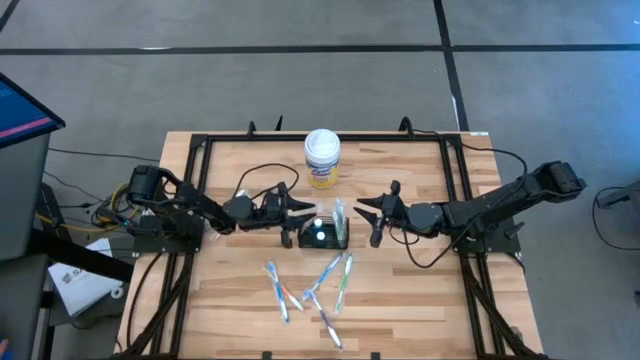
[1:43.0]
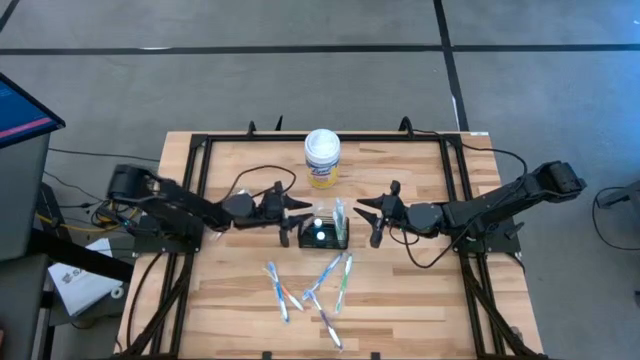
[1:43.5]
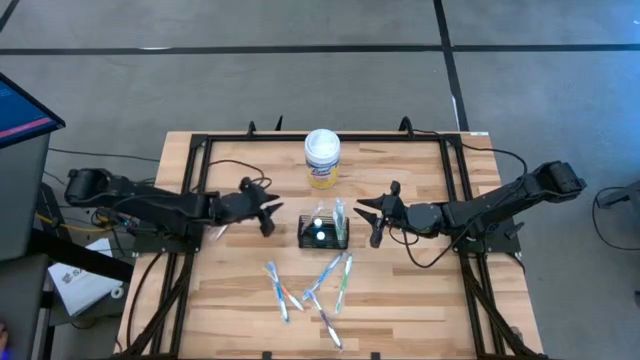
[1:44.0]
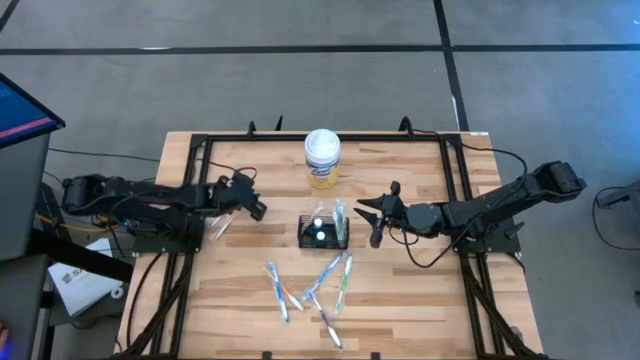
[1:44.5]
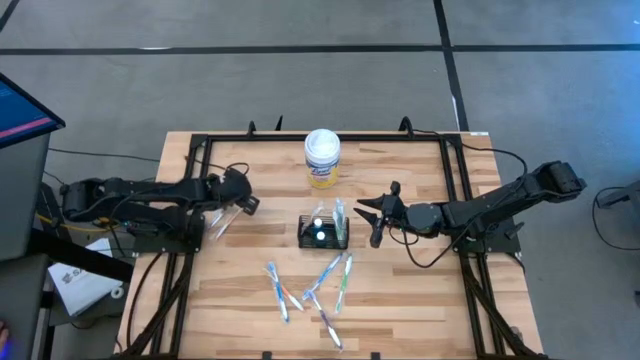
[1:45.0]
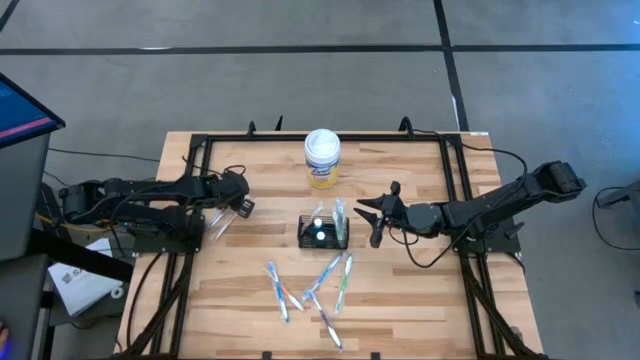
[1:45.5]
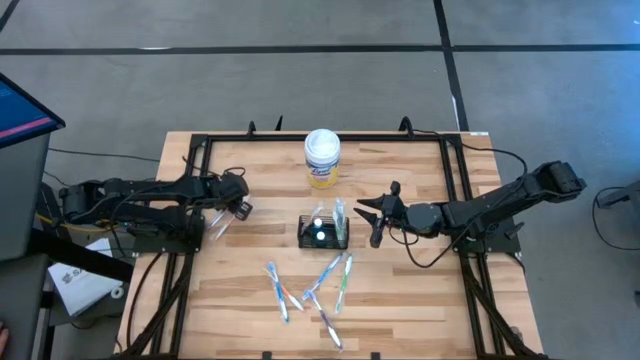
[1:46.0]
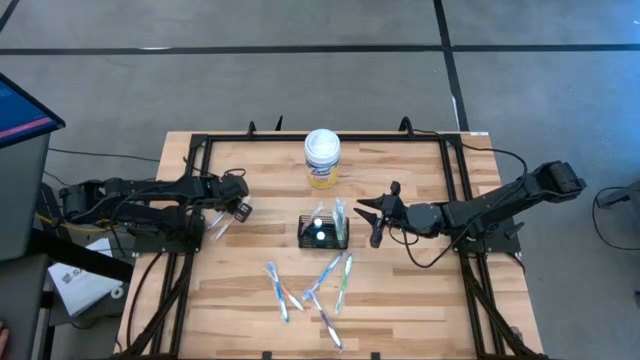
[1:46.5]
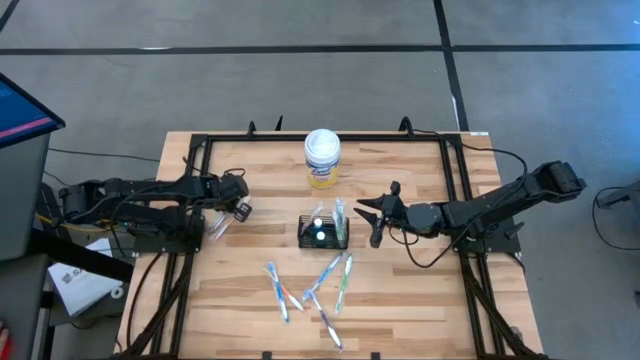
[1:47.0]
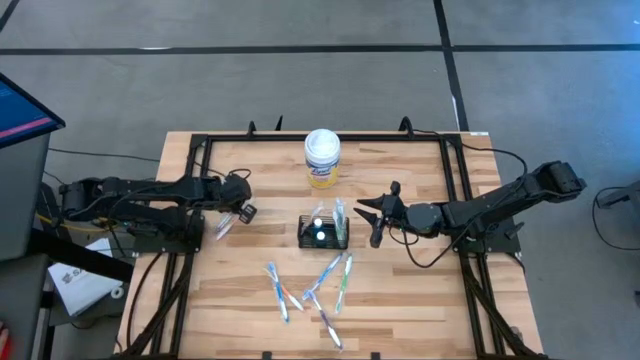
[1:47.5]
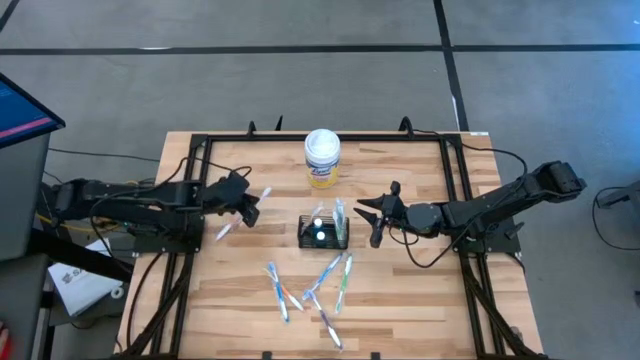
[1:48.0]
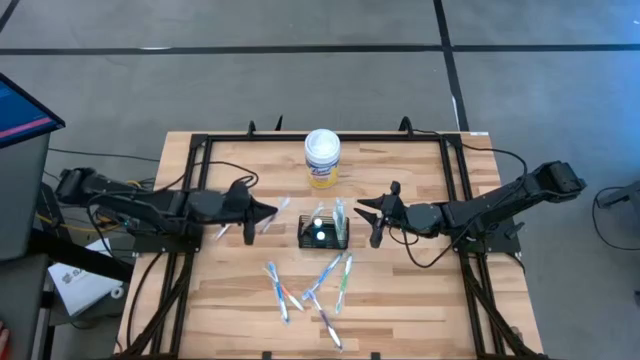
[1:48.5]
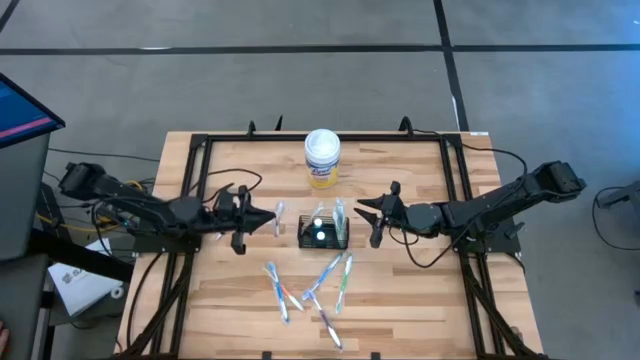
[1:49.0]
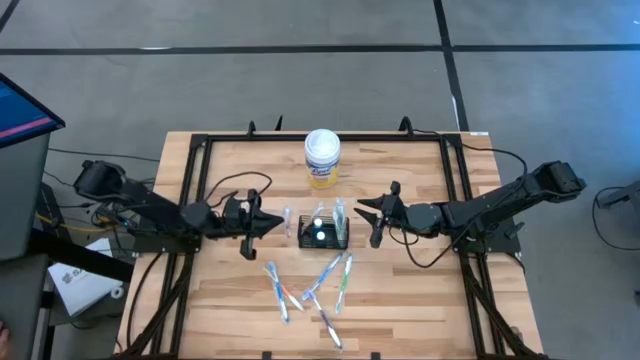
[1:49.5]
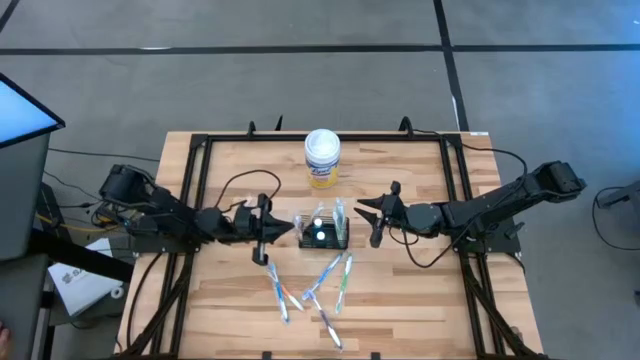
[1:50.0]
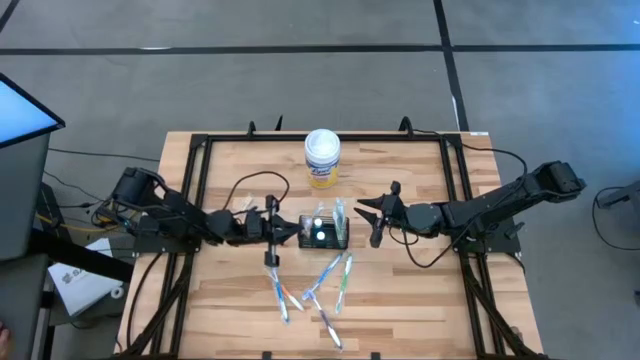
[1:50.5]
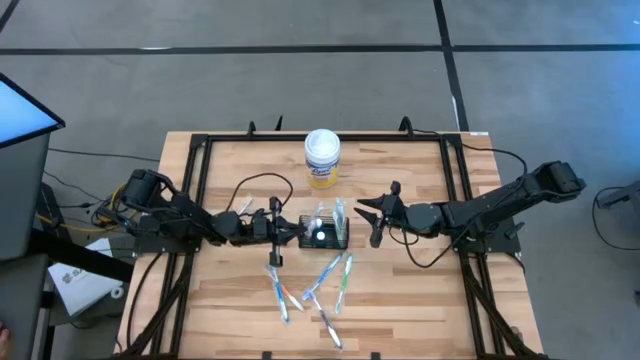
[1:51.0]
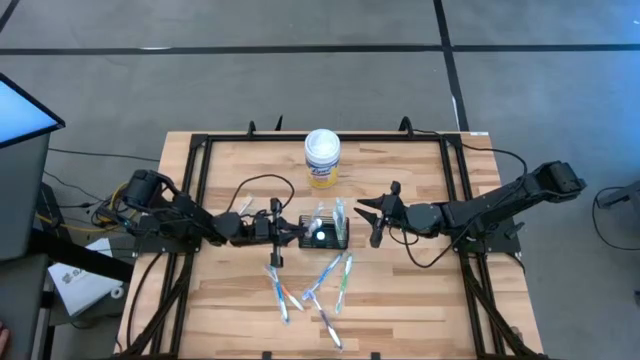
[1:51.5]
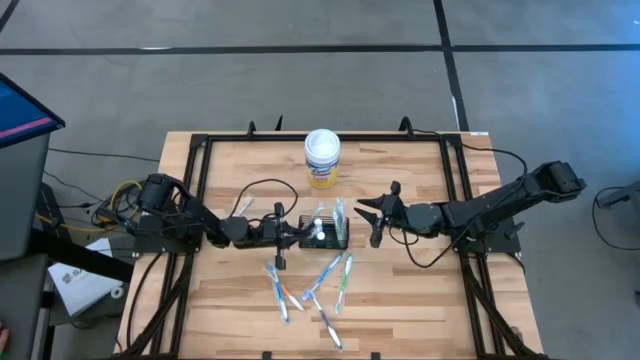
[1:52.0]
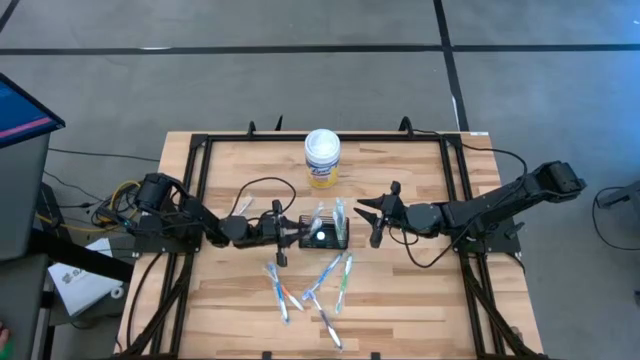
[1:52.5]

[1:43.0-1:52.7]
Task: Pick & Place toothbrushing station
Put the top violet toothbrush into the black mesh organizer

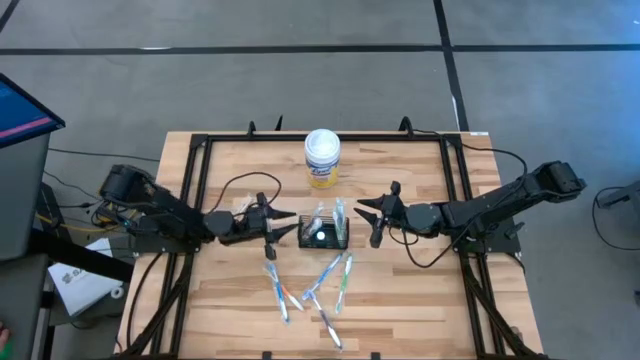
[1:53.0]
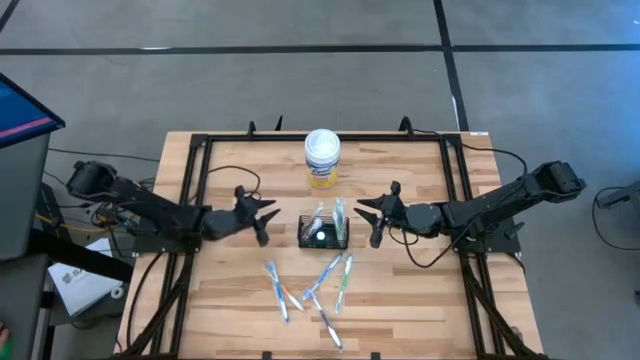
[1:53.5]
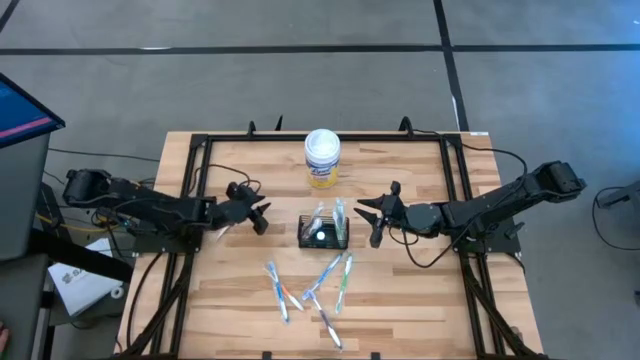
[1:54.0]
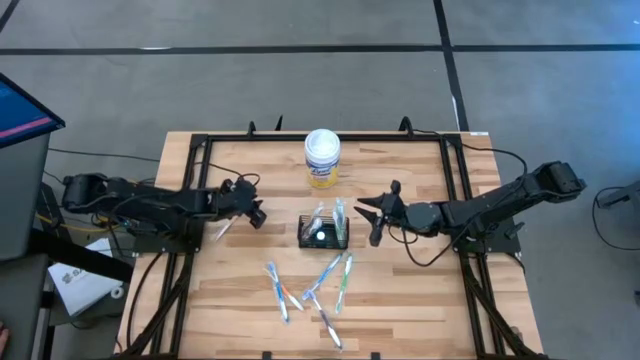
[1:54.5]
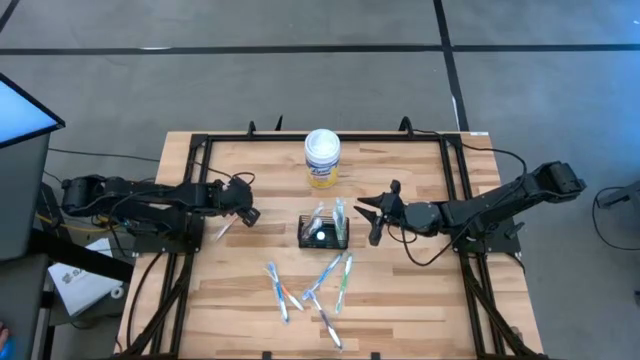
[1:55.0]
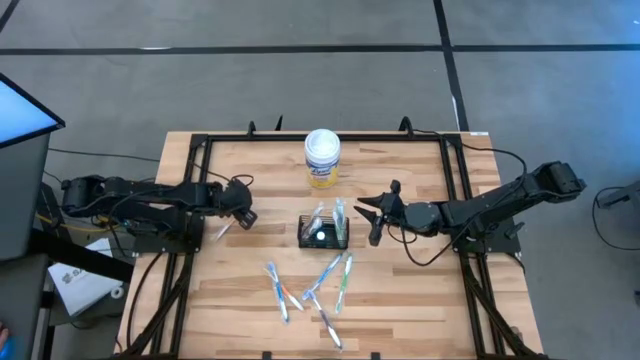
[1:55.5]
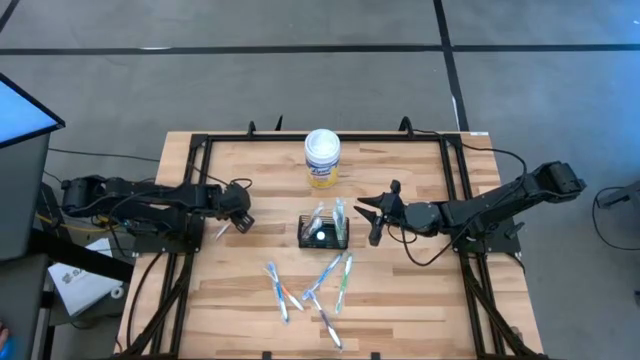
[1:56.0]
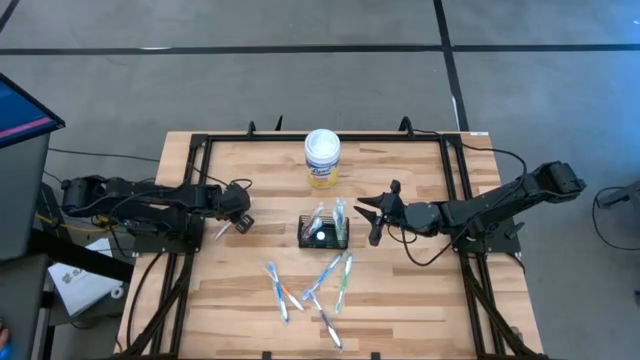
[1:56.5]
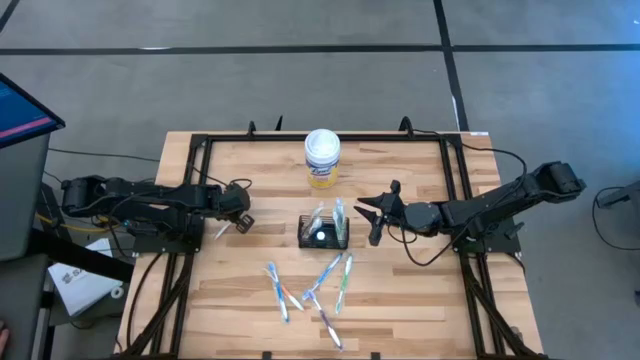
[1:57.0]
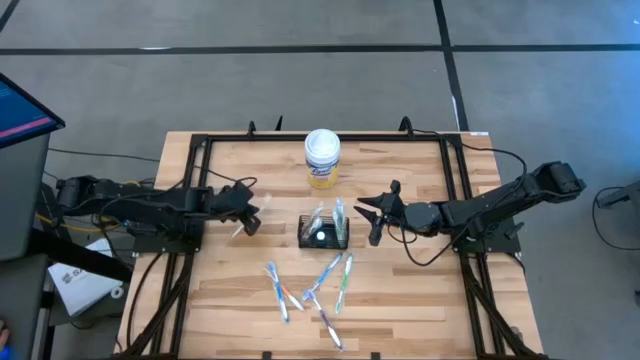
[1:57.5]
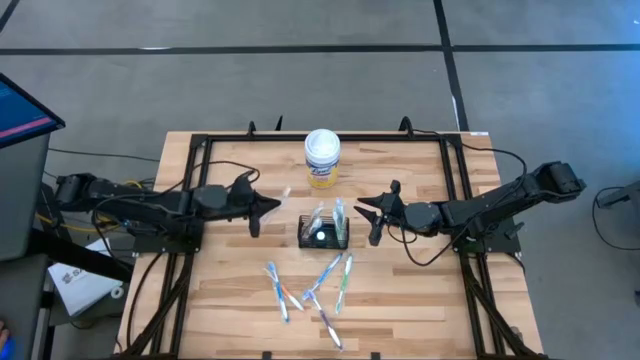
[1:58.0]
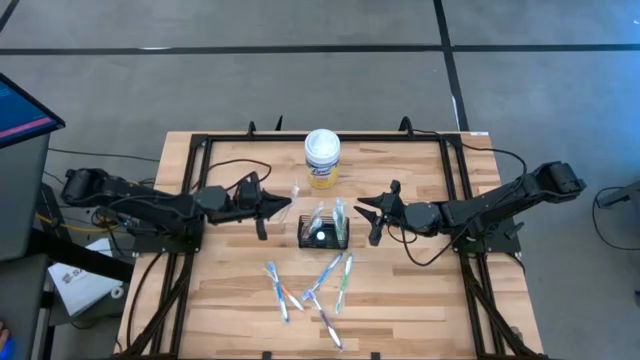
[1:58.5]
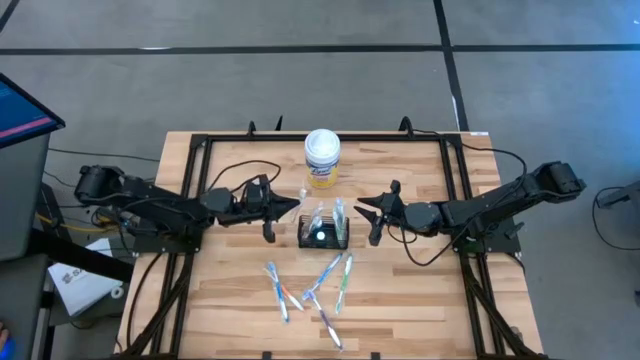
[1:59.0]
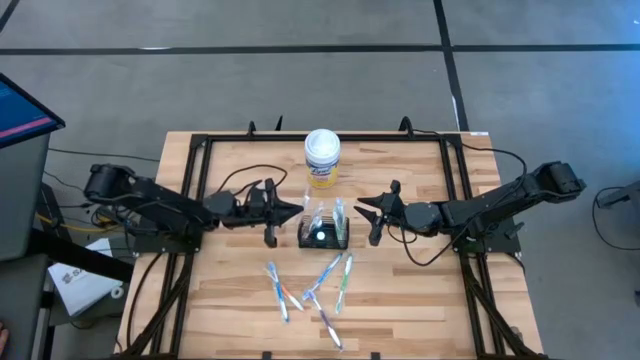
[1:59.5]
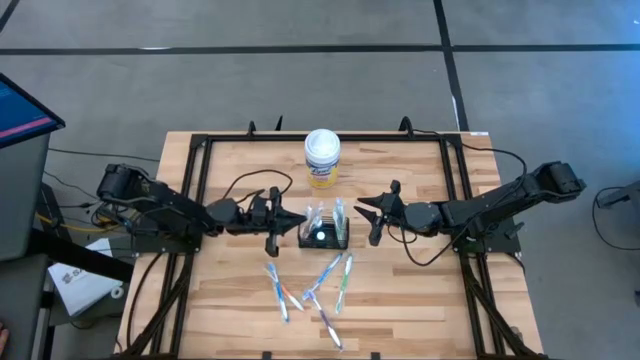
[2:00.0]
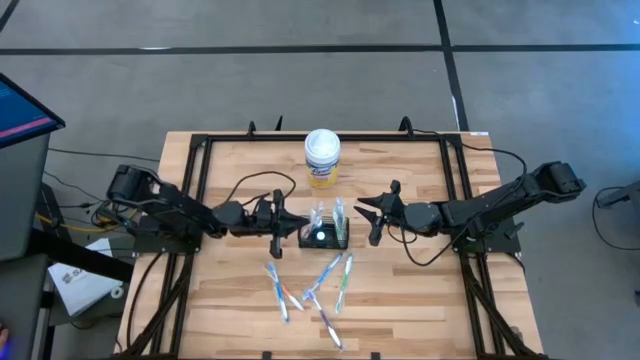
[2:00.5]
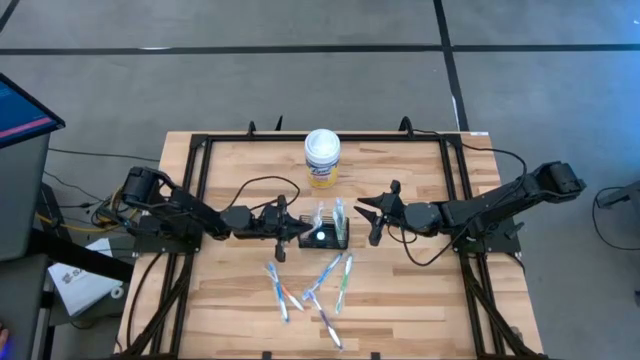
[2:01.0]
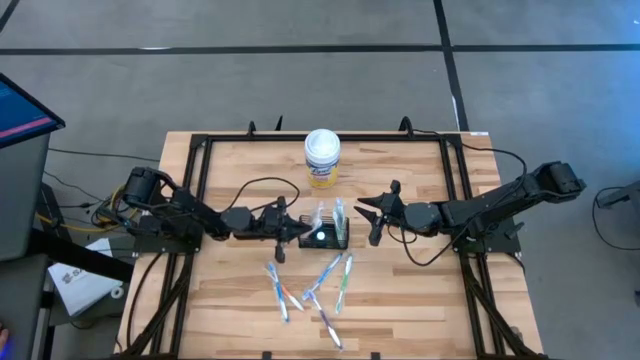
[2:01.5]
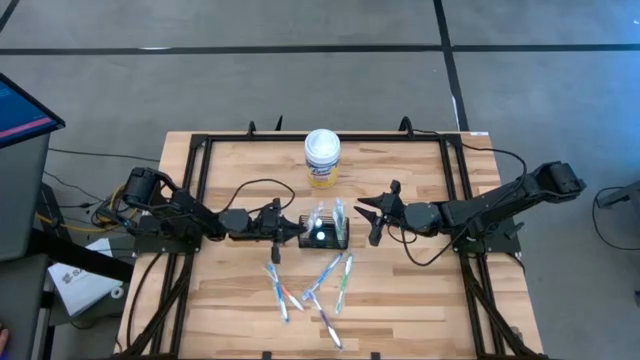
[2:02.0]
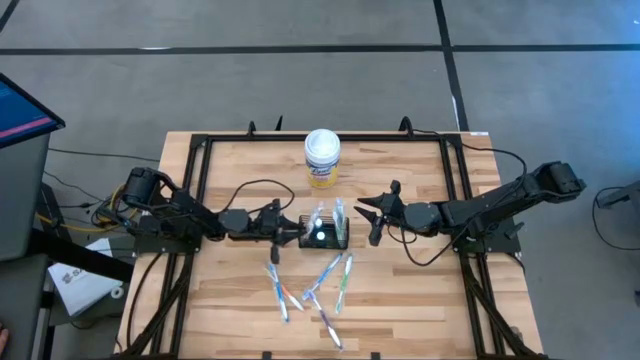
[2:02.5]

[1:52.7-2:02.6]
Put the top orange toothbrush into the black mesh organizer

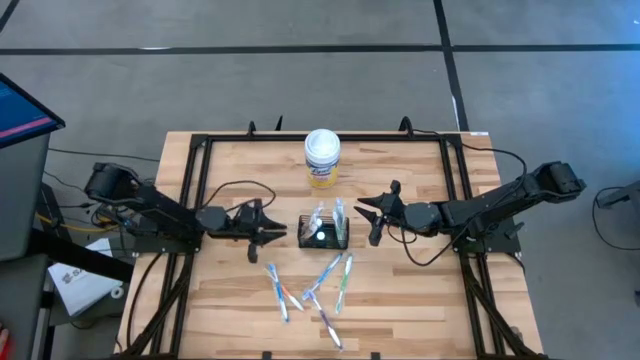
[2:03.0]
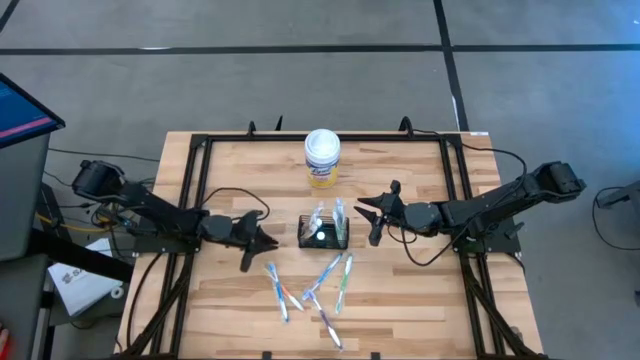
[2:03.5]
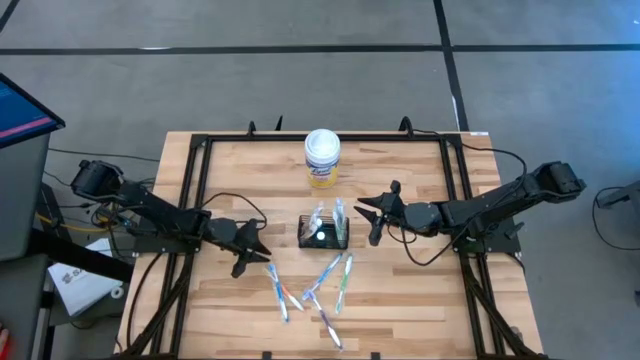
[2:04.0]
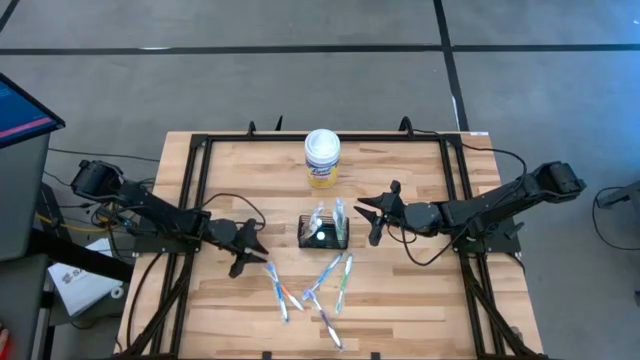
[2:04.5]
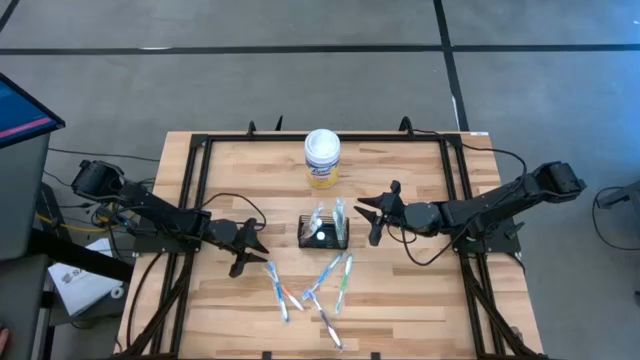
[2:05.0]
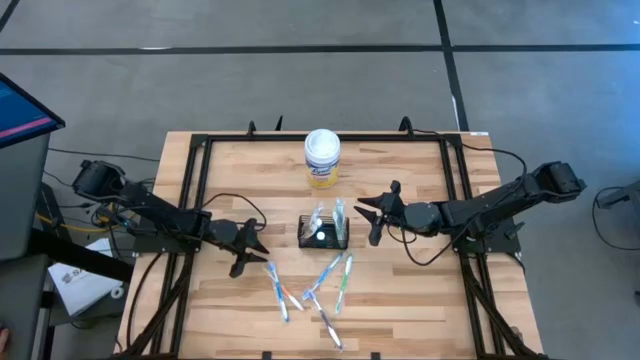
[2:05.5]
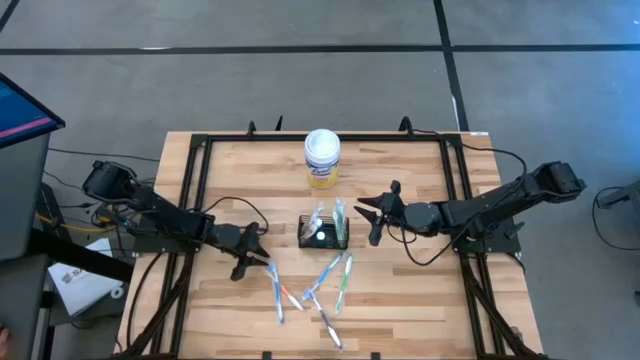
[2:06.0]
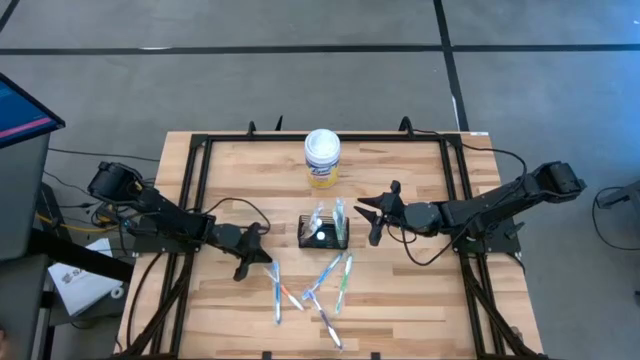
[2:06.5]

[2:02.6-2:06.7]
Put the left blue toothbrush into the black mesh organizer
